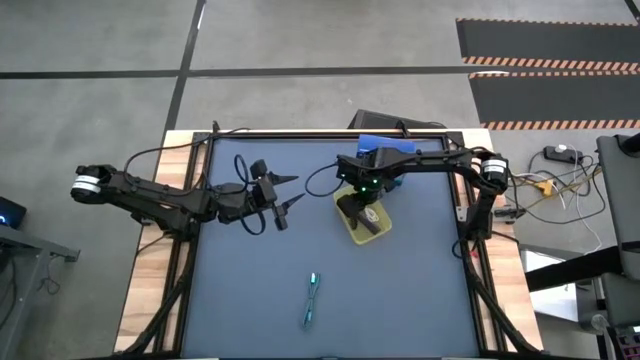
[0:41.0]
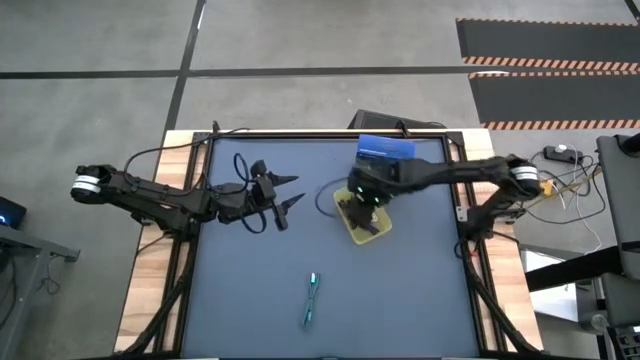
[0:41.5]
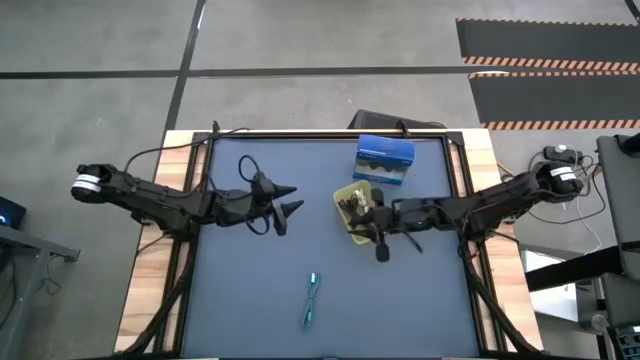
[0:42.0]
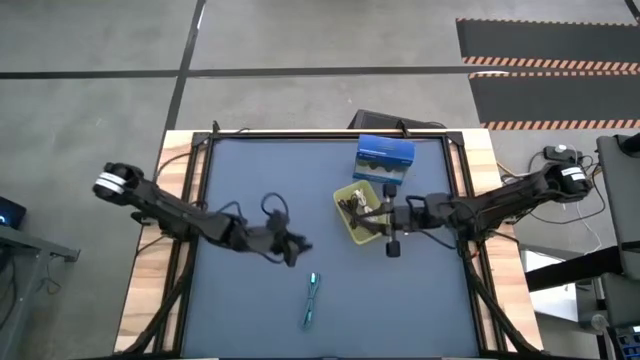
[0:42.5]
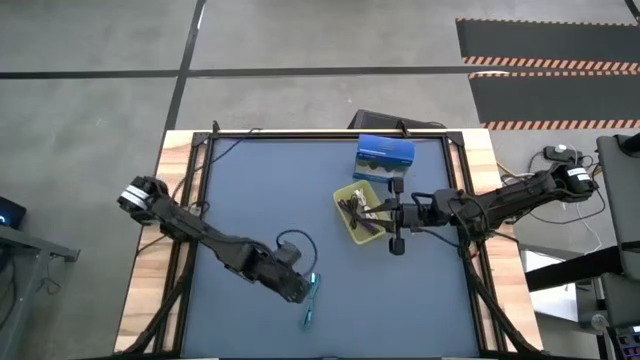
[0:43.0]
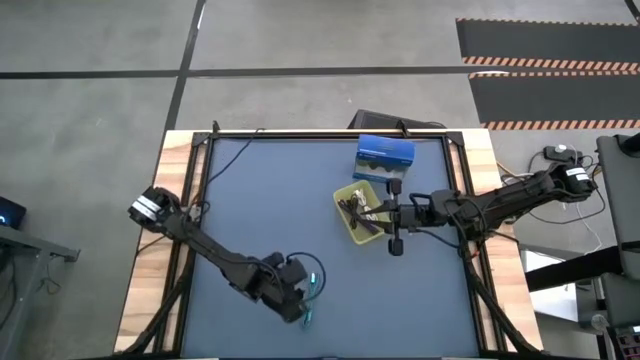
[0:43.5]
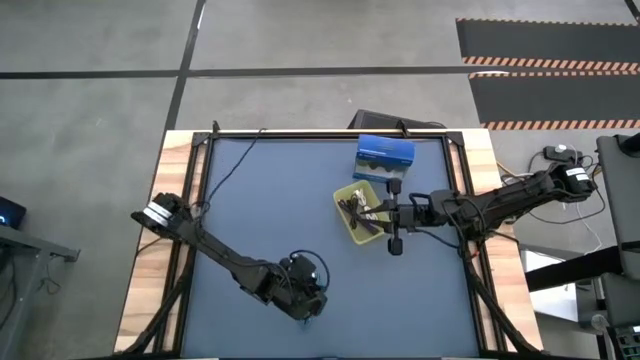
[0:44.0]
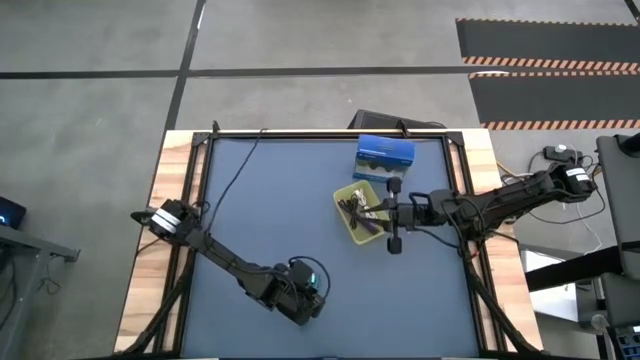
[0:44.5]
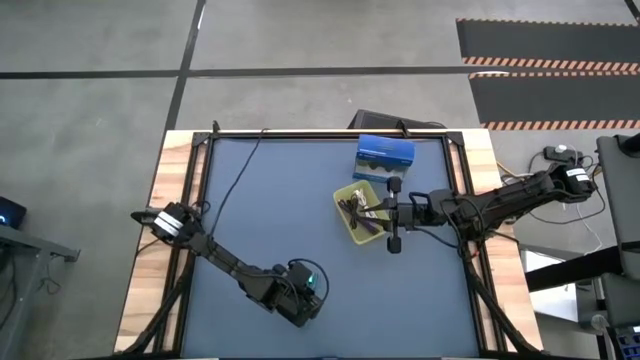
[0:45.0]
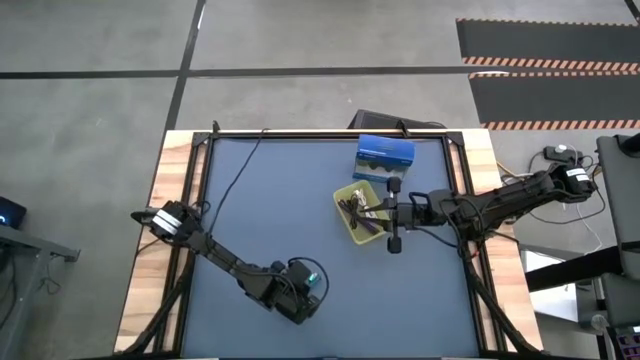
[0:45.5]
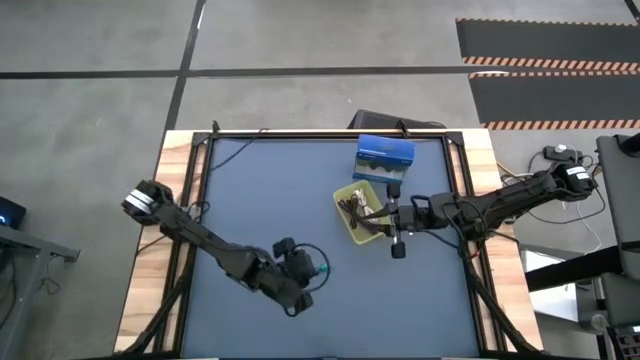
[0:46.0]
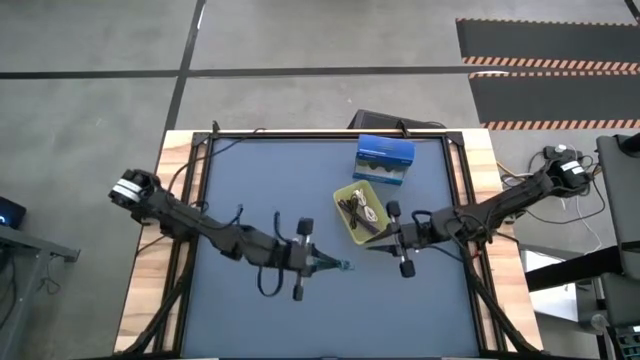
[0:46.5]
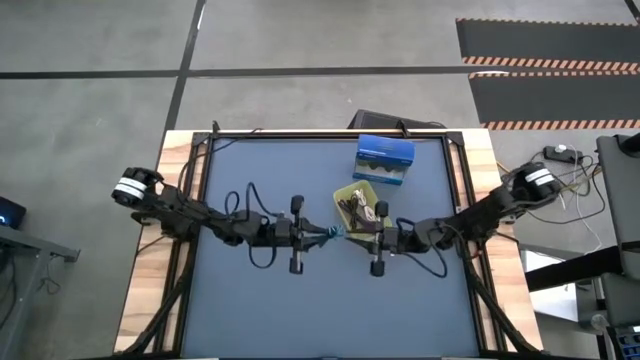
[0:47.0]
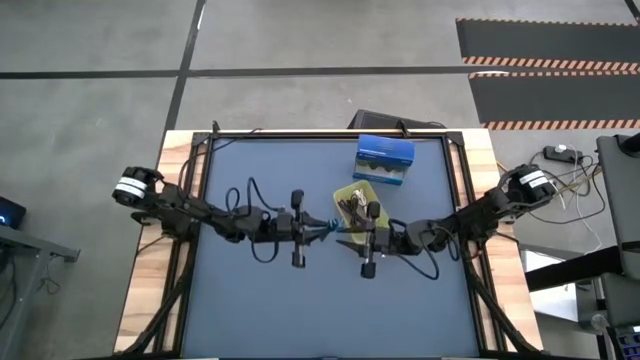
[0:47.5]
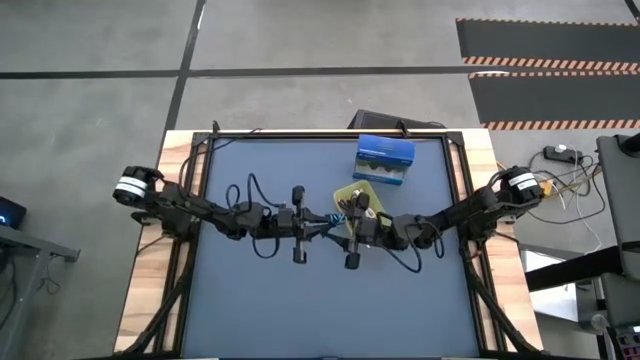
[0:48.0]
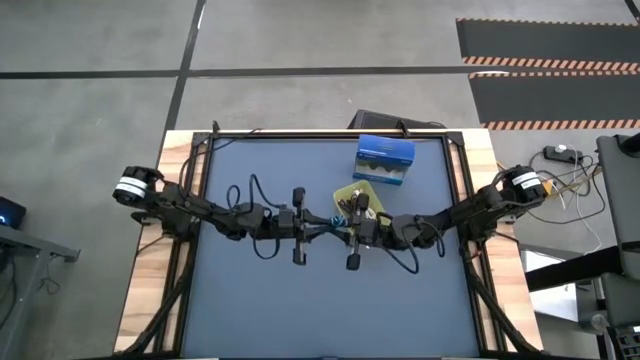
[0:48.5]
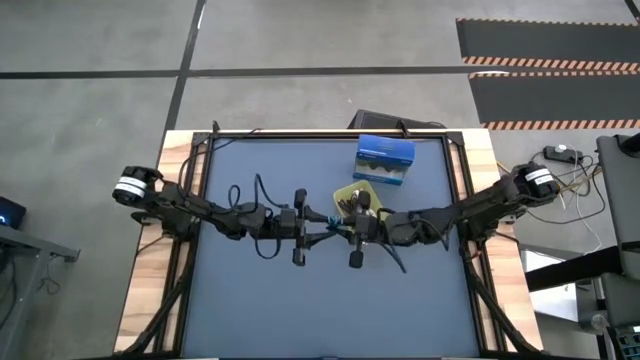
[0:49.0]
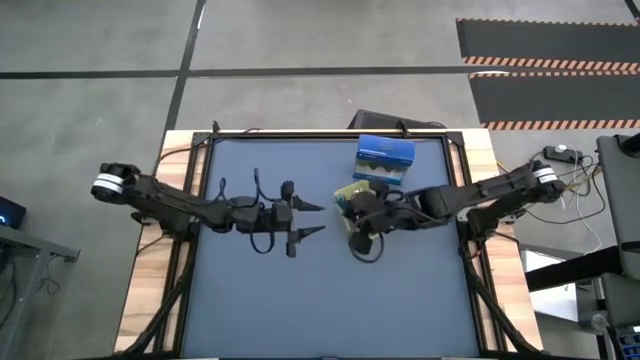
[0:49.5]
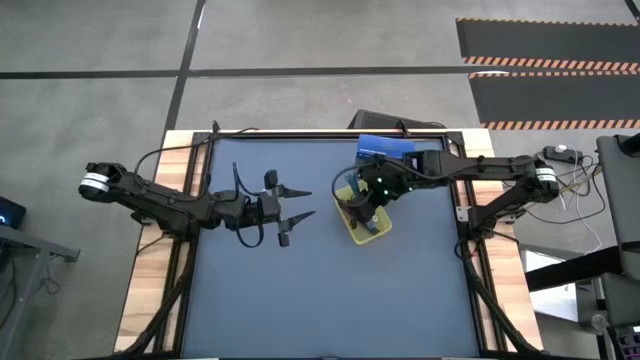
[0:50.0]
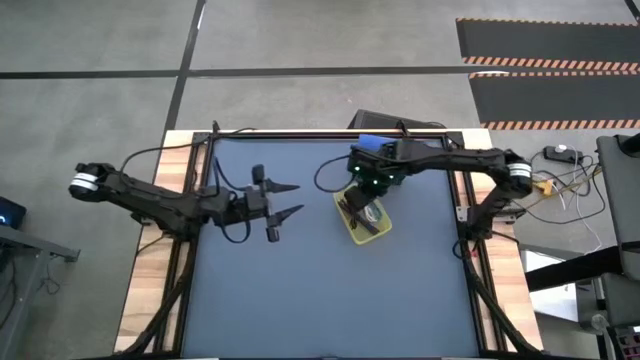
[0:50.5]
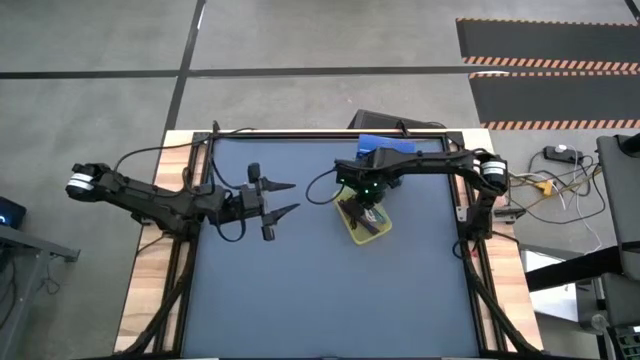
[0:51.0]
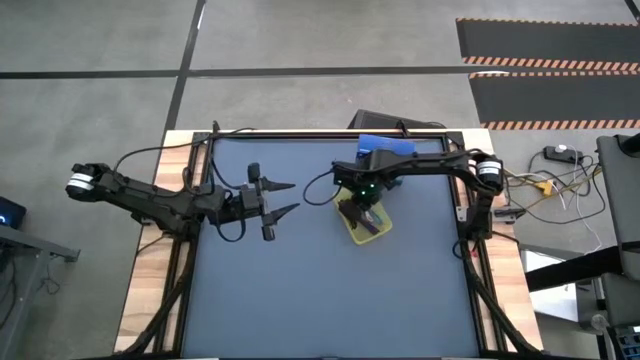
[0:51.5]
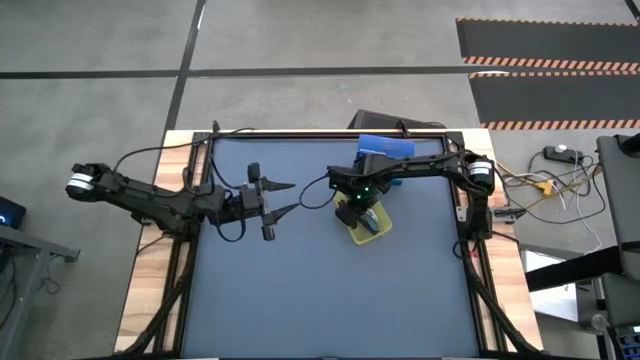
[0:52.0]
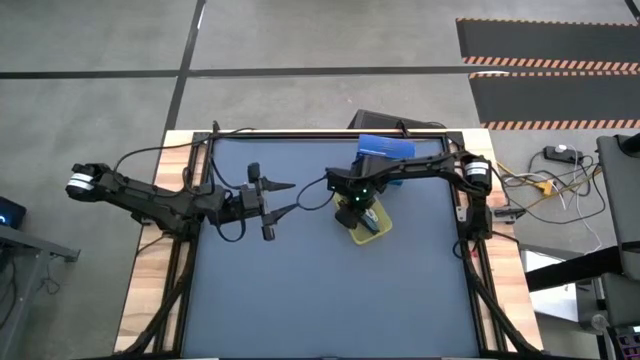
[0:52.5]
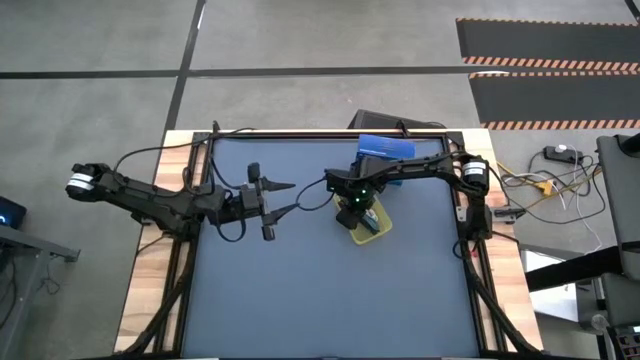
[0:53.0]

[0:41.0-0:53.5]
Task: Pick and place USB-C Cables
Put the light blue charger cable into the yellow bin

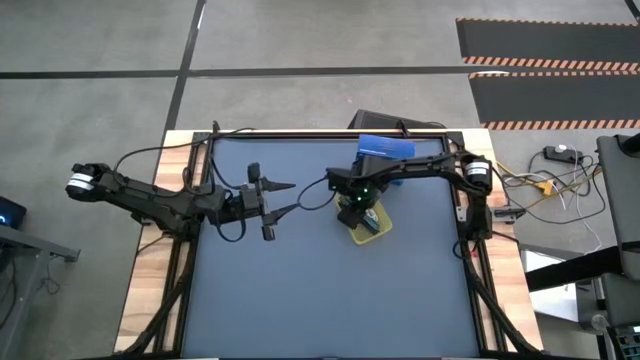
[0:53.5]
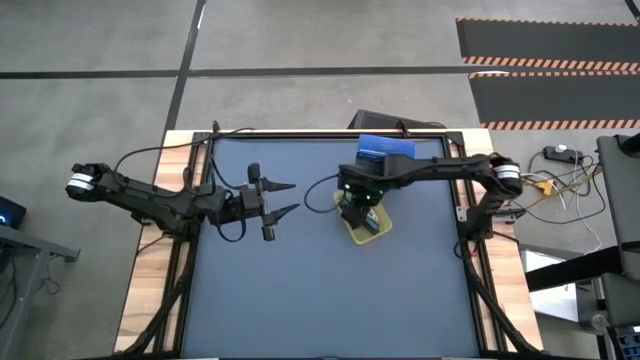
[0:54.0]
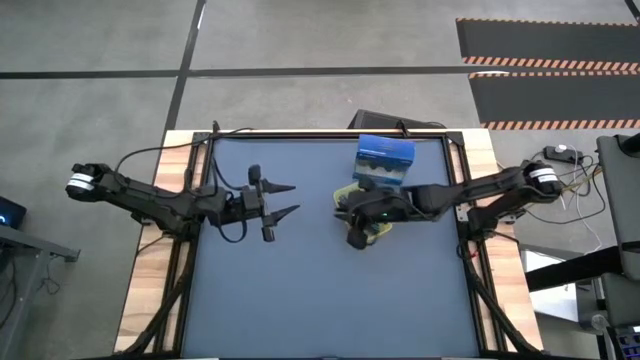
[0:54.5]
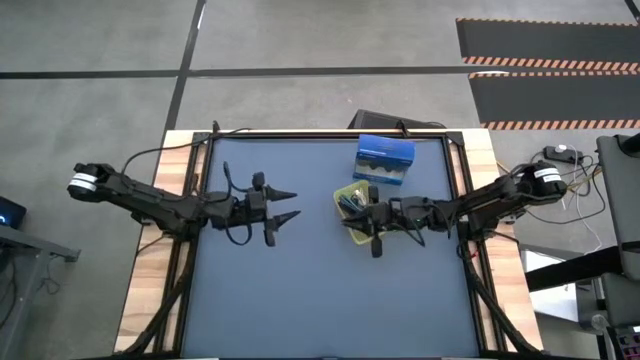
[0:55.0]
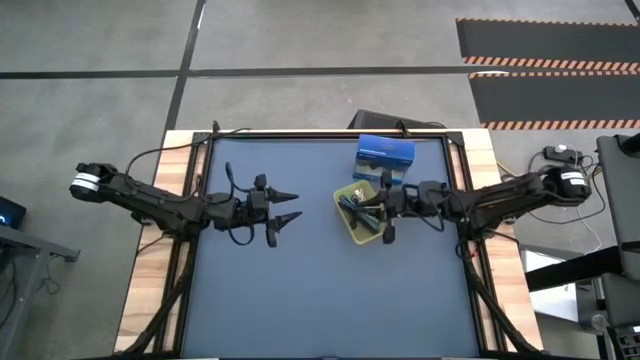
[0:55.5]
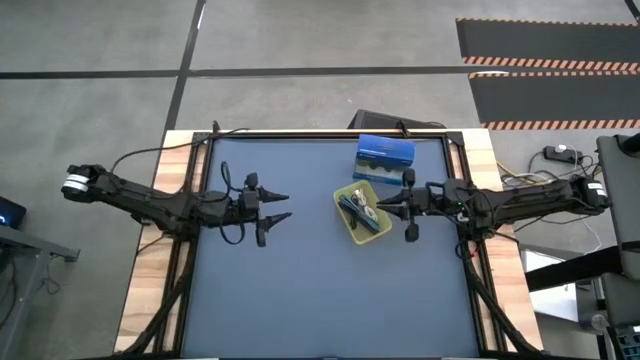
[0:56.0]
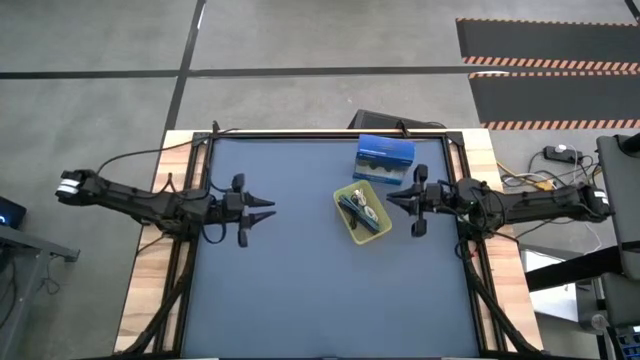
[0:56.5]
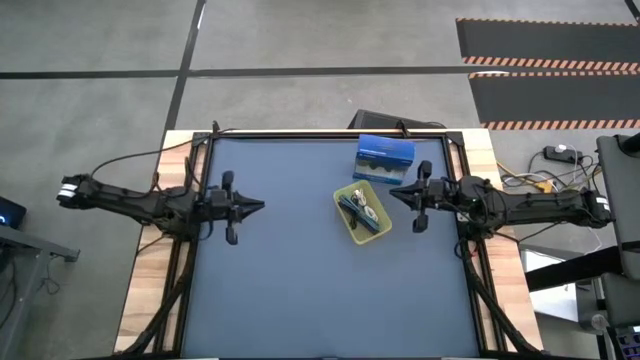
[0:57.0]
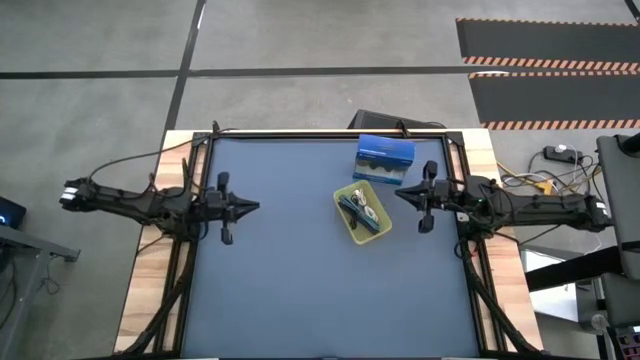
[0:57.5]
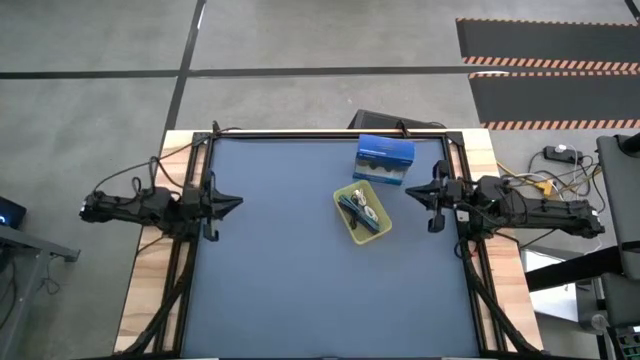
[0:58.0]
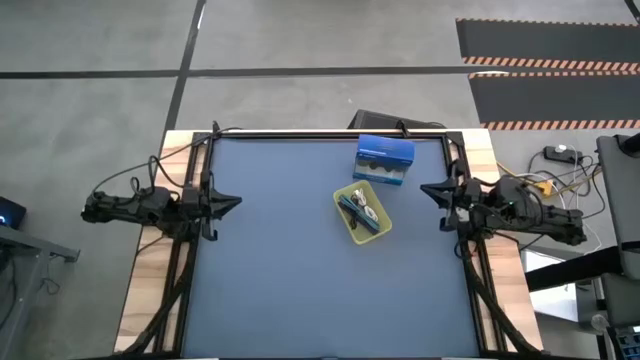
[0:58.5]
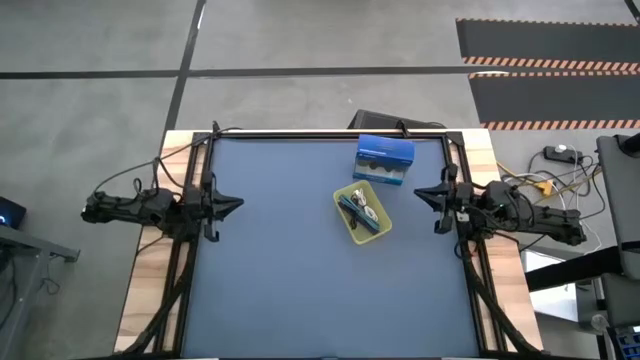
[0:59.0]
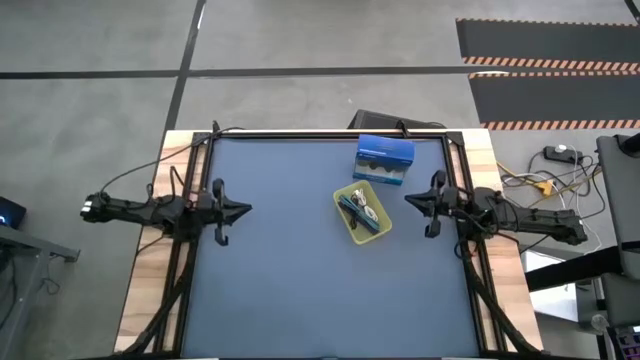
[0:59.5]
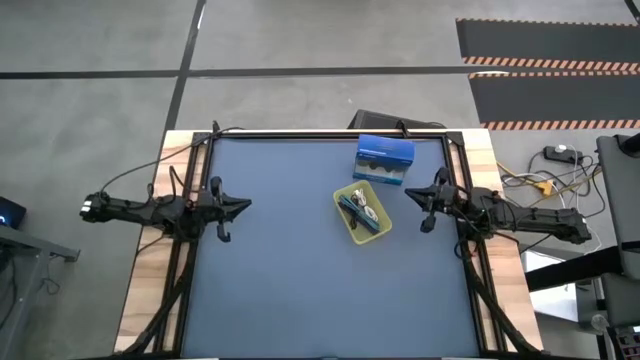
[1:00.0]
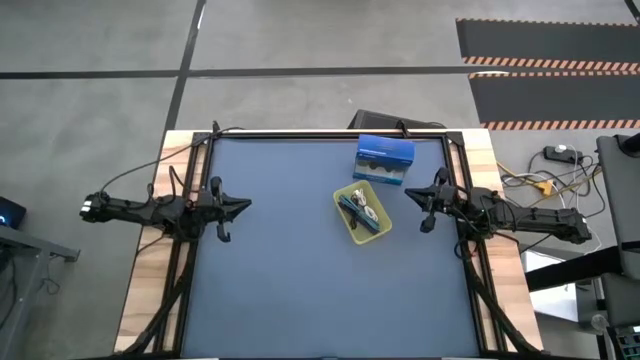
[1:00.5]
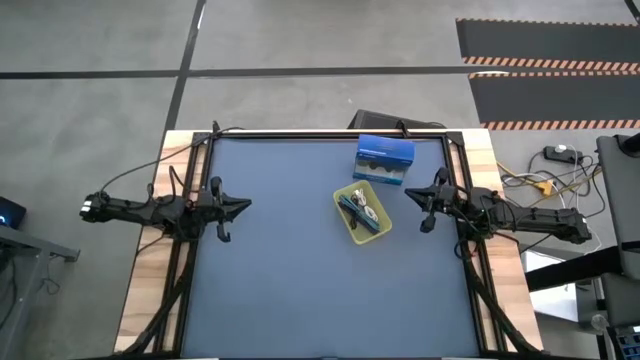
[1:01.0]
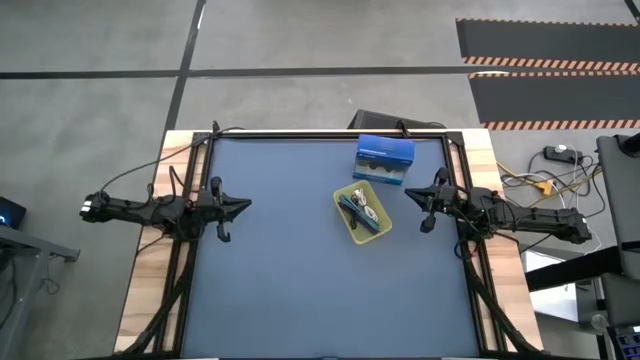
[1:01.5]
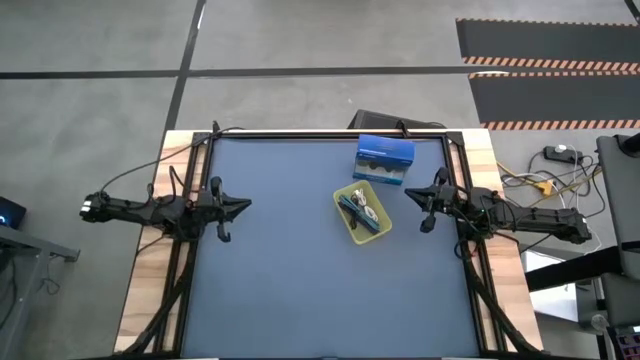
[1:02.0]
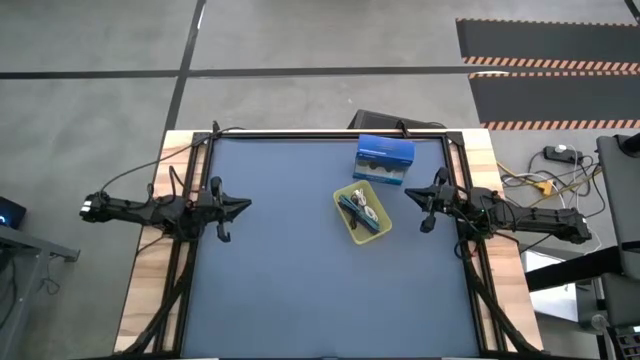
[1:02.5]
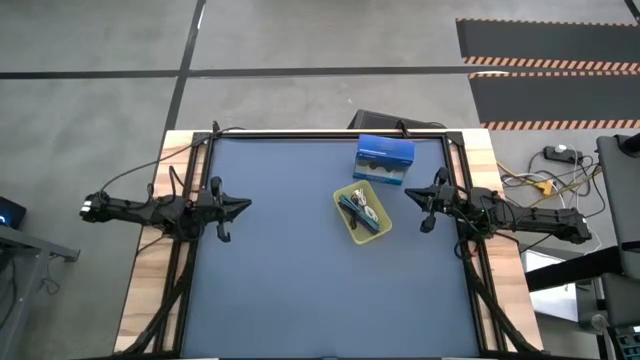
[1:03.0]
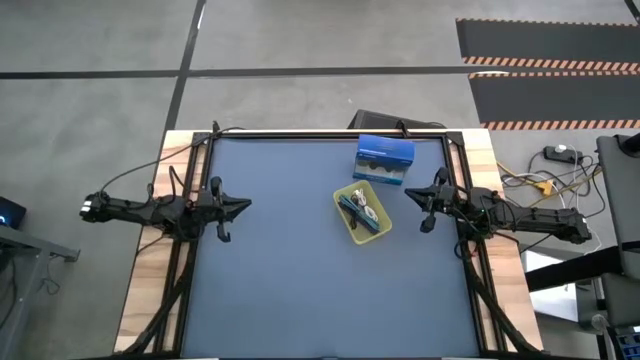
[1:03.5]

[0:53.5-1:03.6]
Return to Home Position
